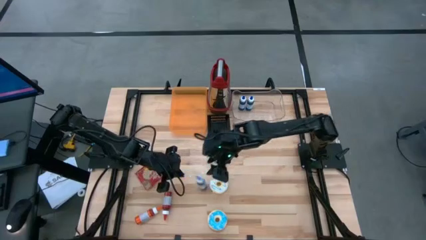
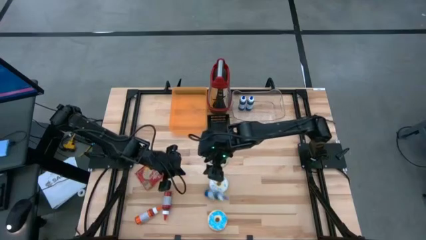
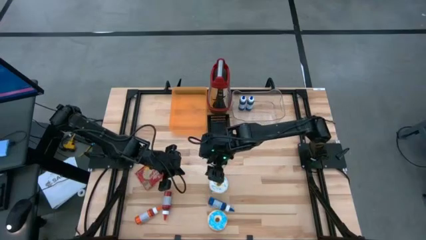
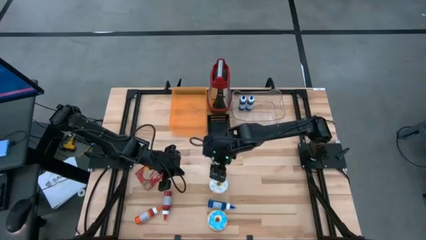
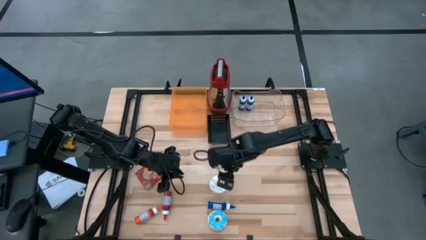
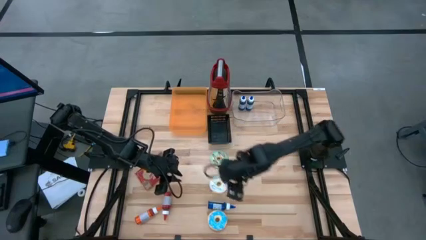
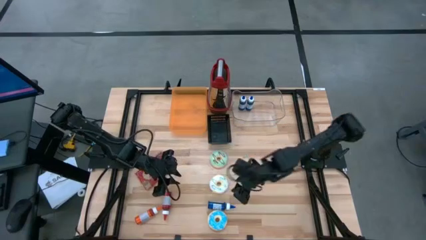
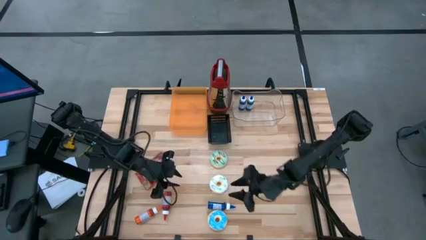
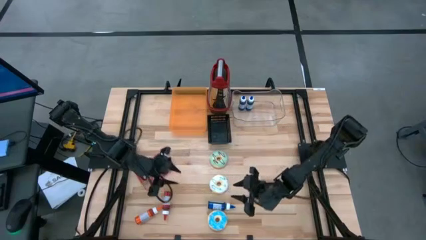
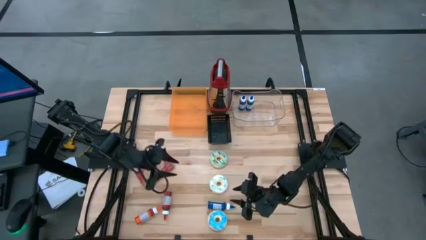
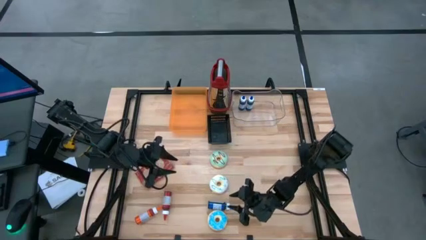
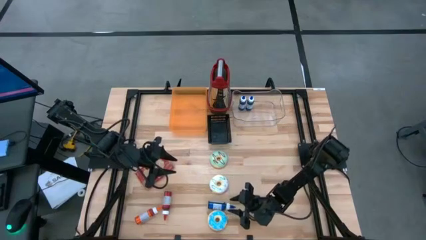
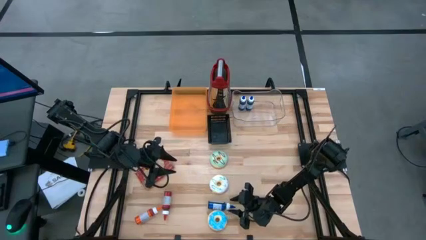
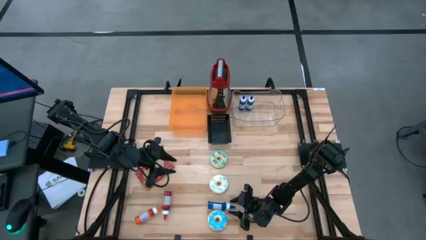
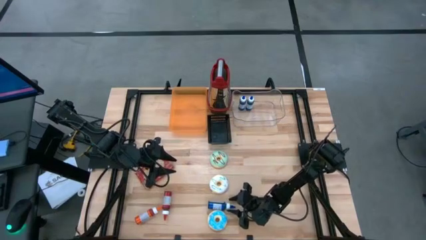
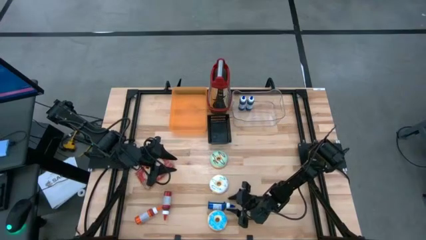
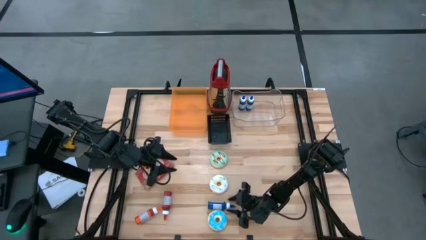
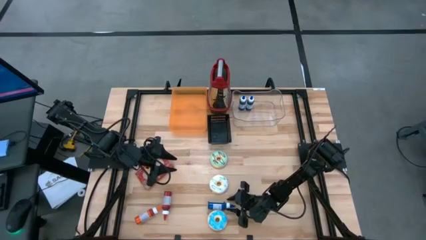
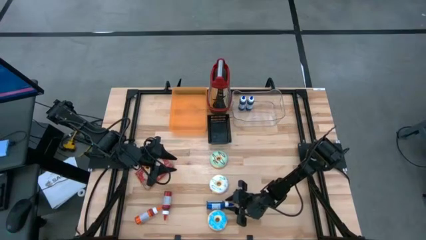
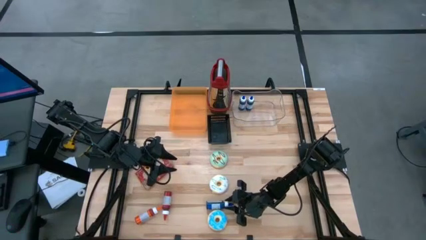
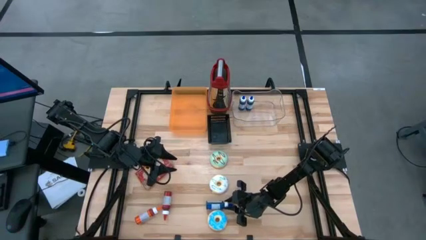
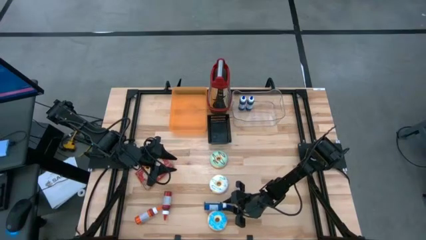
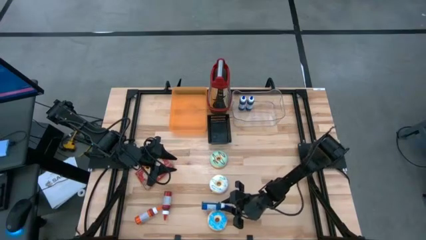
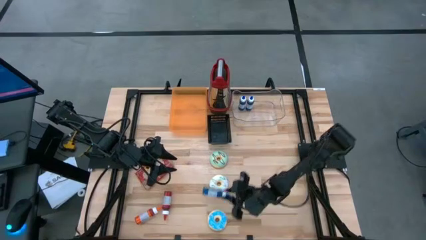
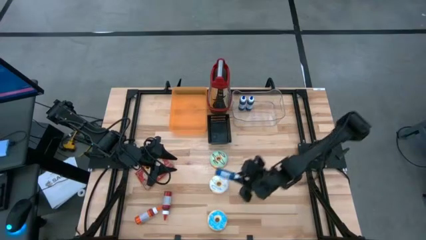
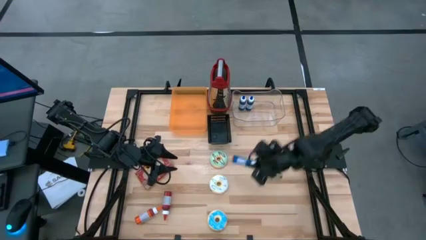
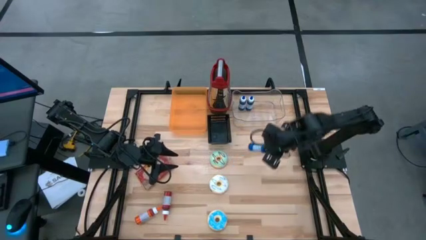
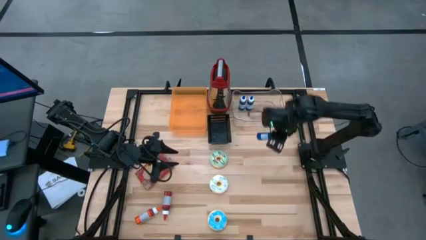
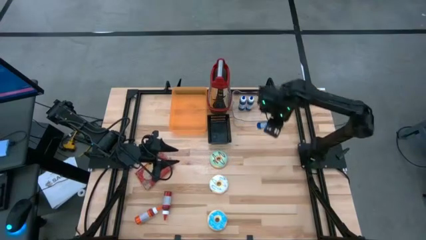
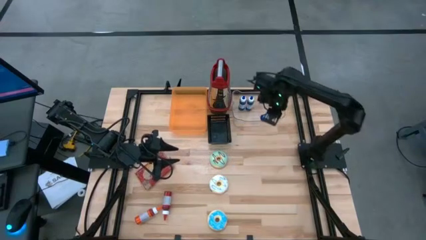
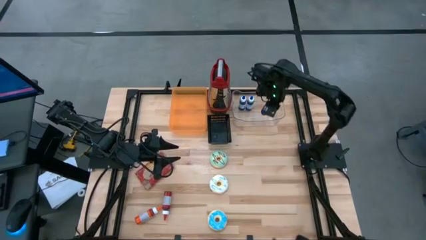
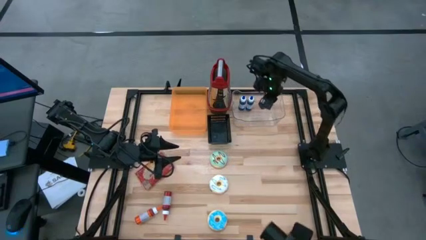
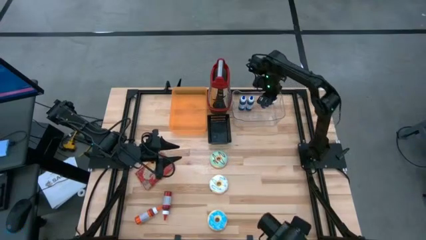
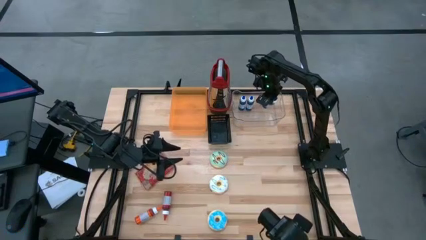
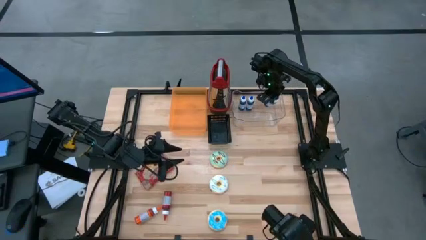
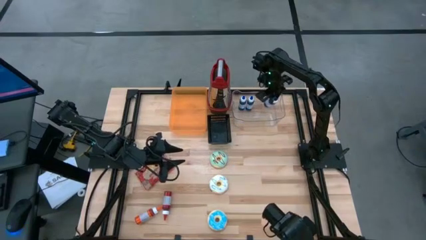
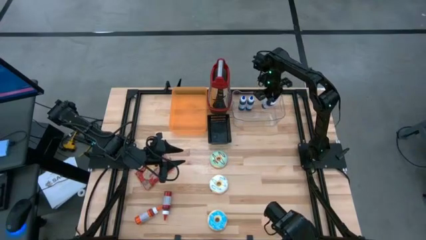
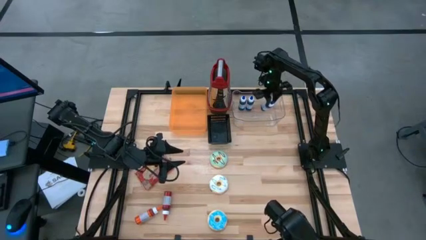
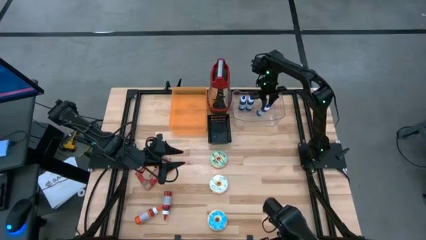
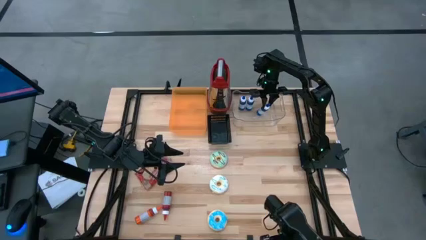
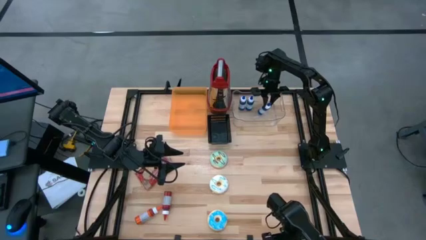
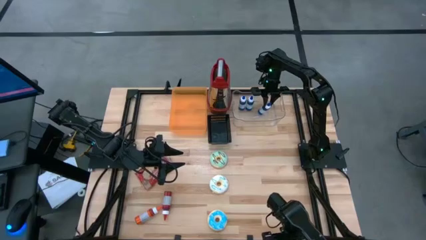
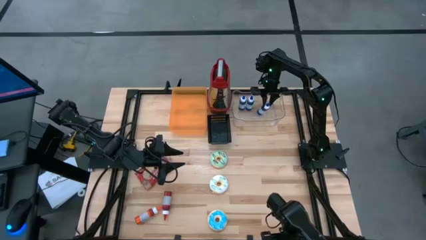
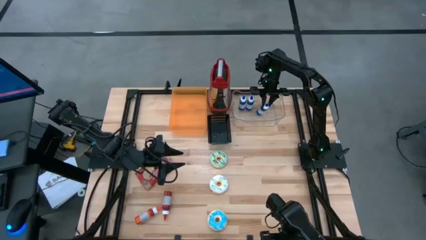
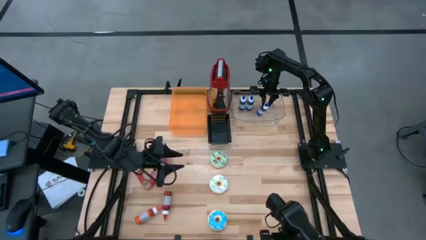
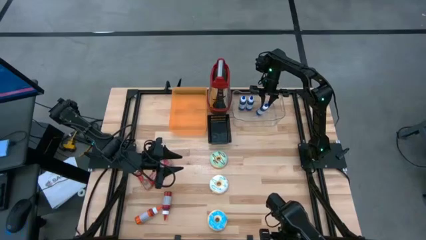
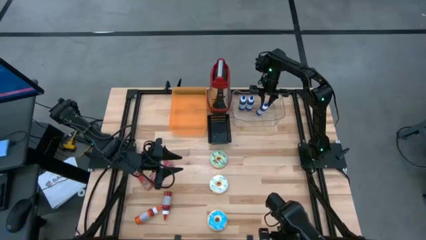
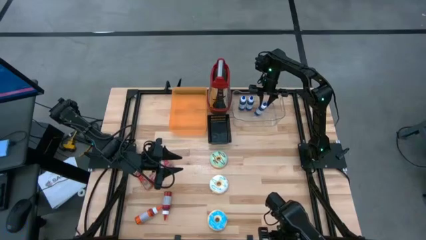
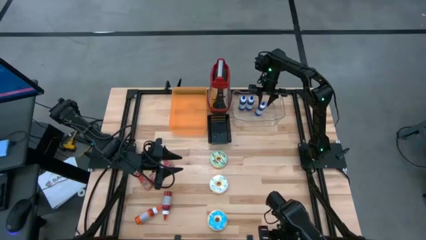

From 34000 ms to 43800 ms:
Put the blue food coloring bottle into the transparent bin

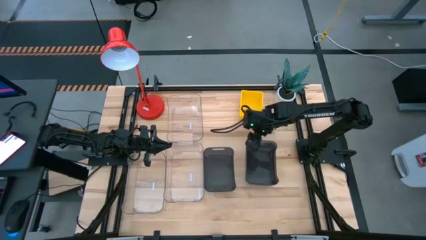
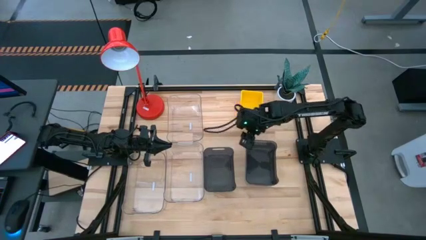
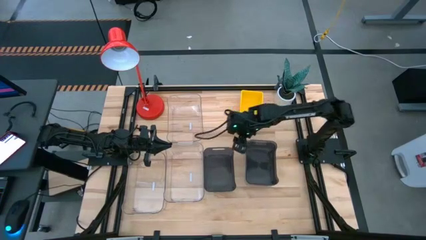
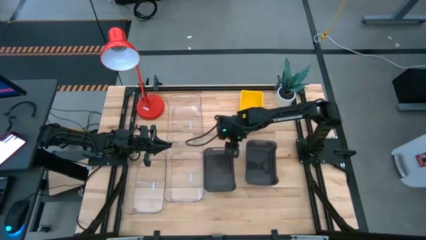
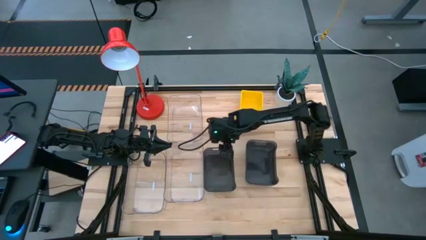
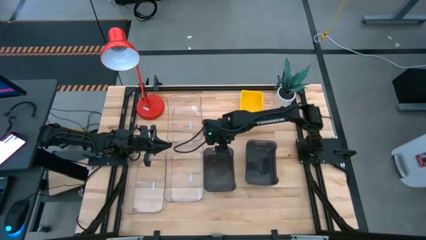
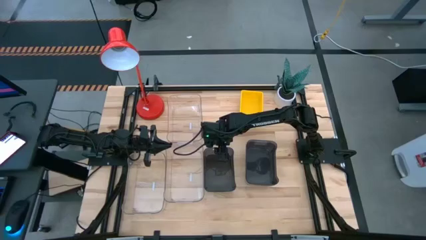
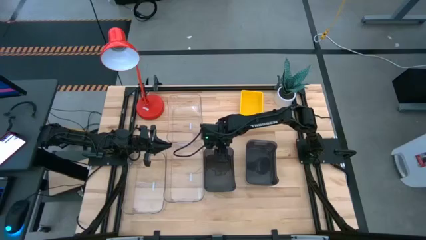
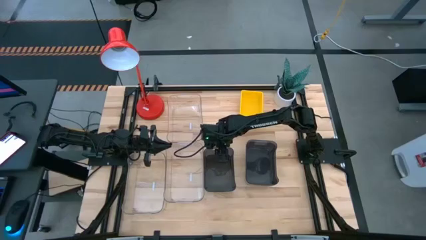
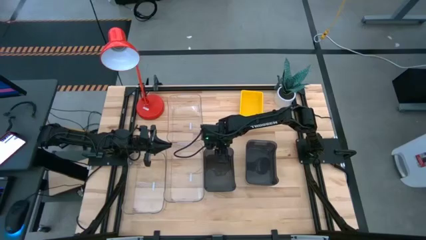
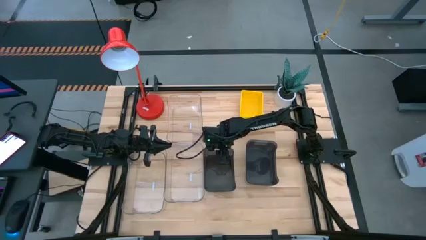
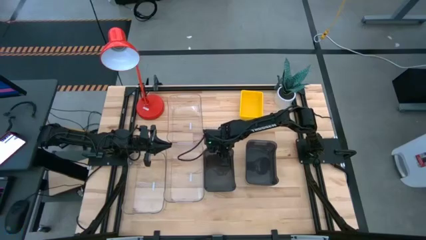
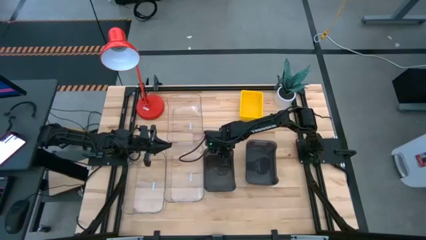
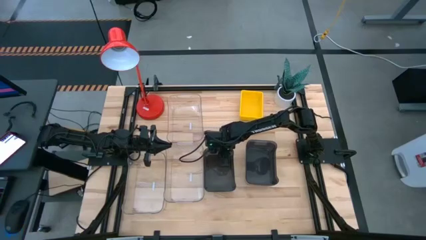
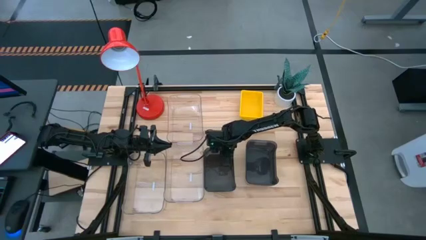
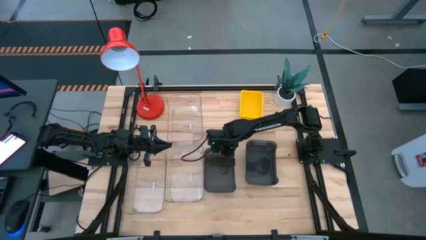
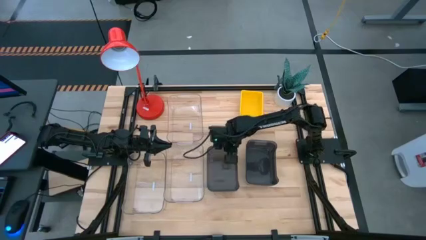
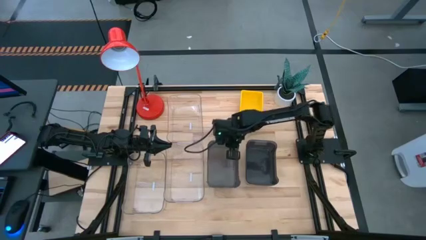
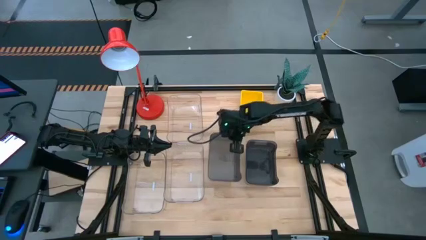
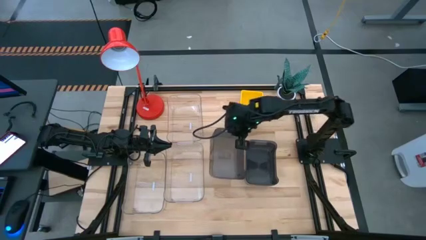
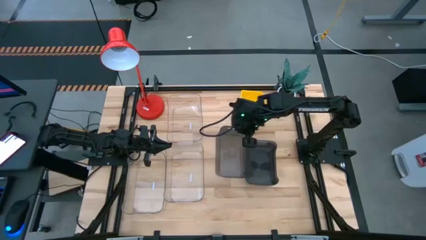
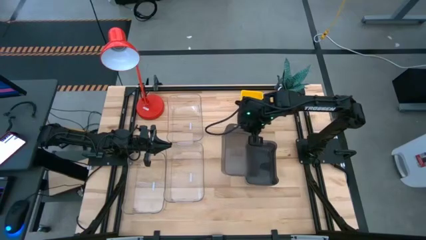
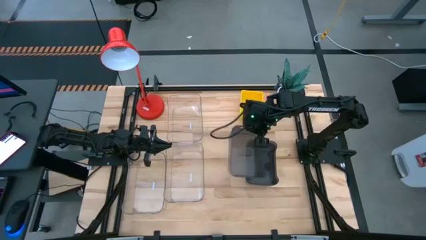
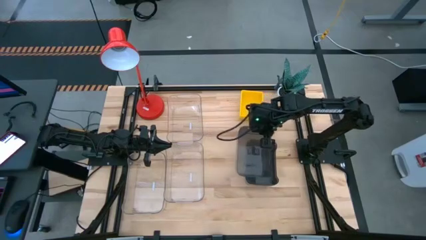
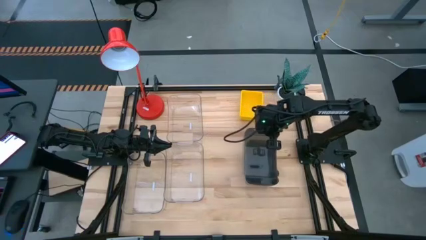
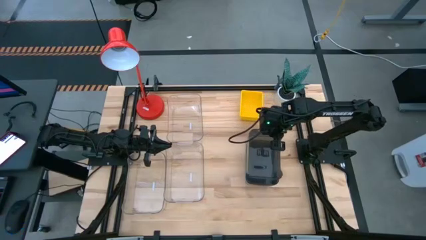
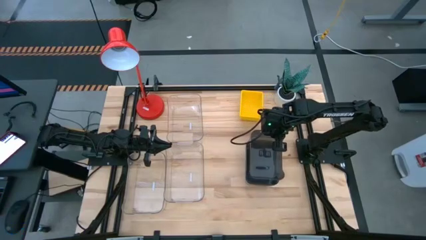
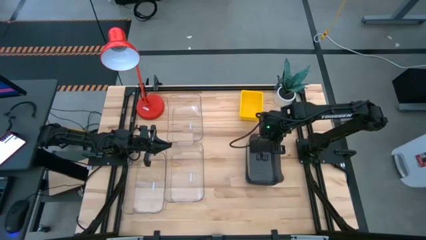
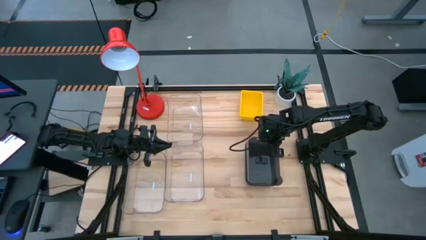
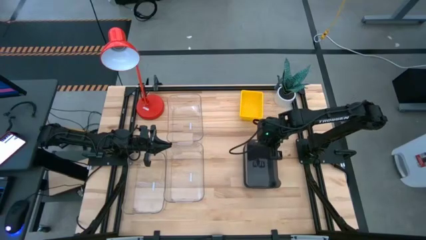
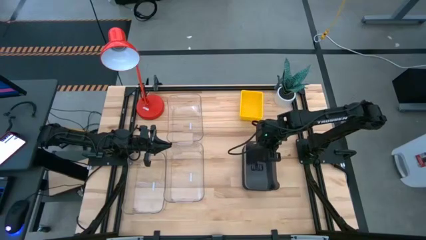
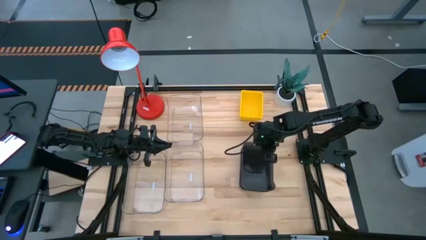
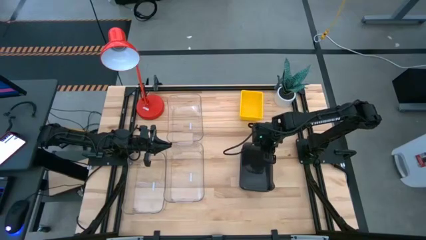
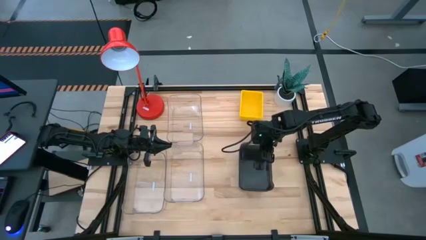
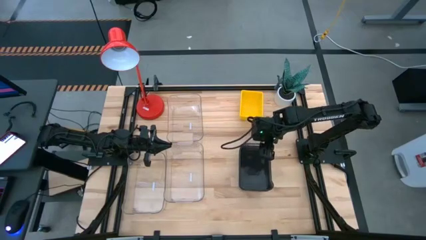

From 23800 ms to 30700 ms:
Stack the left black bin on the black bins
